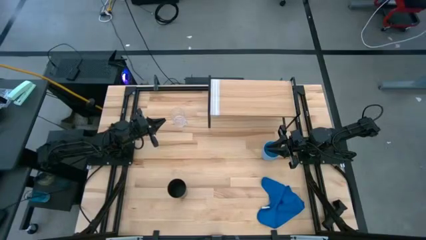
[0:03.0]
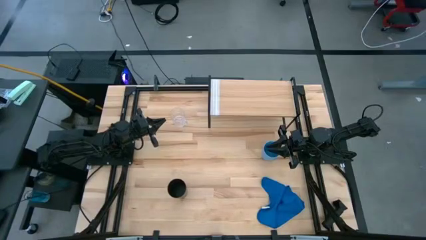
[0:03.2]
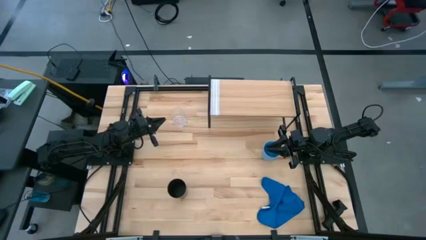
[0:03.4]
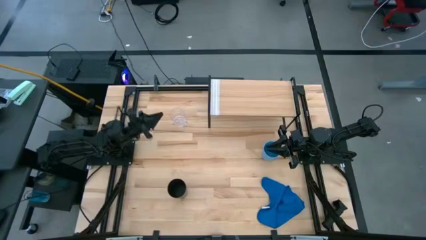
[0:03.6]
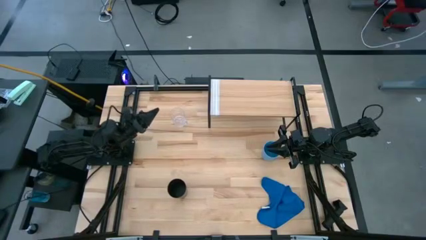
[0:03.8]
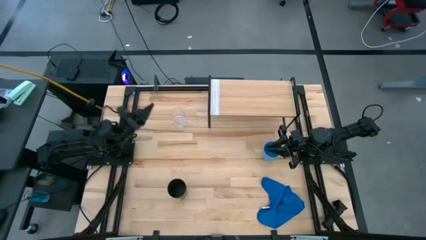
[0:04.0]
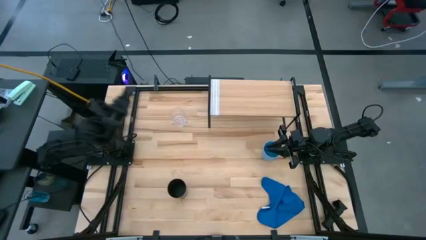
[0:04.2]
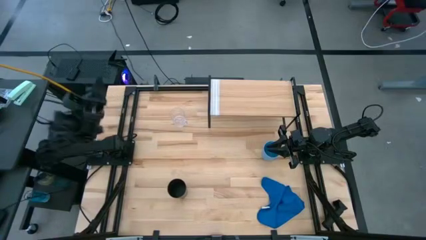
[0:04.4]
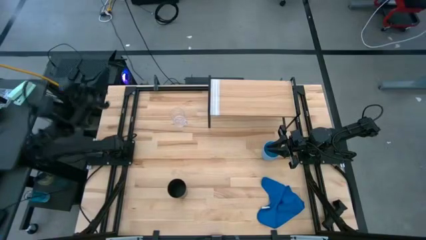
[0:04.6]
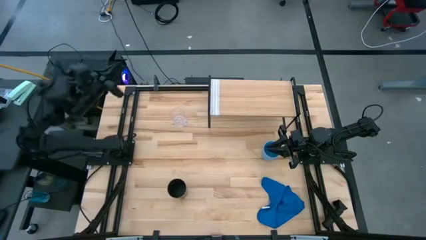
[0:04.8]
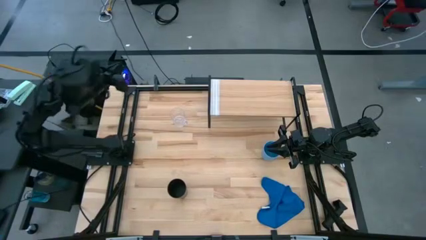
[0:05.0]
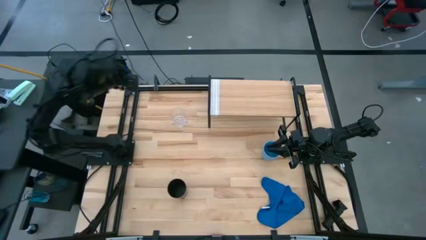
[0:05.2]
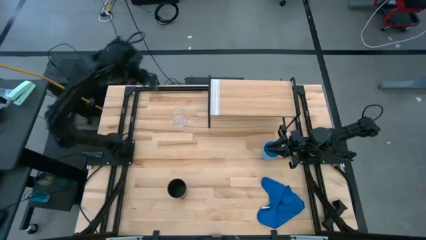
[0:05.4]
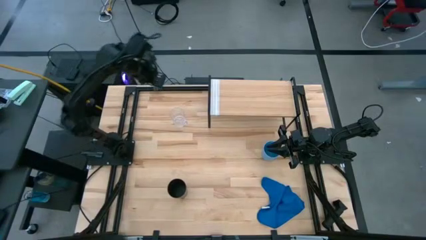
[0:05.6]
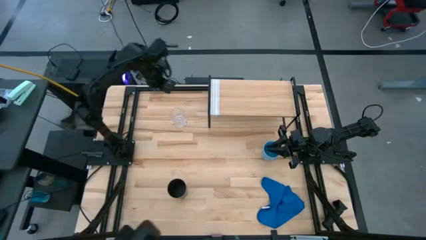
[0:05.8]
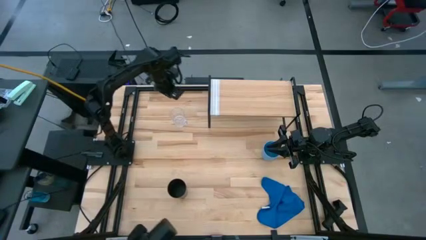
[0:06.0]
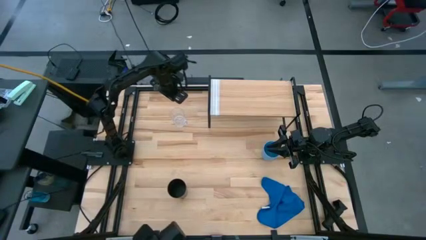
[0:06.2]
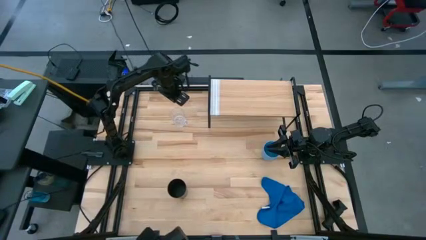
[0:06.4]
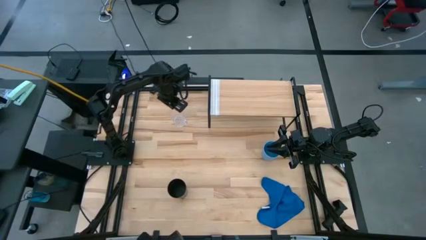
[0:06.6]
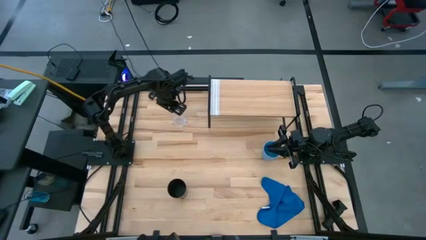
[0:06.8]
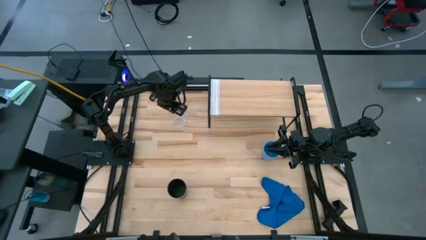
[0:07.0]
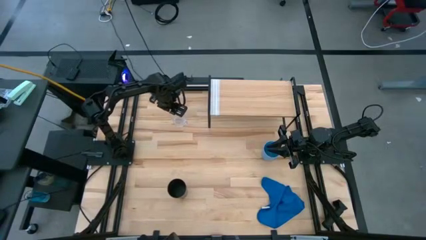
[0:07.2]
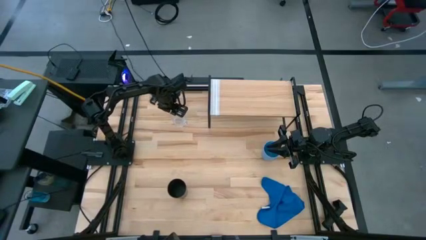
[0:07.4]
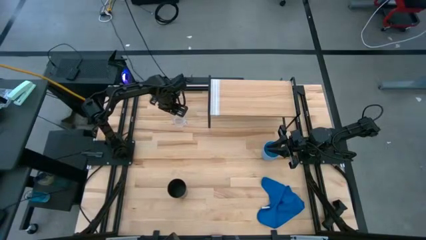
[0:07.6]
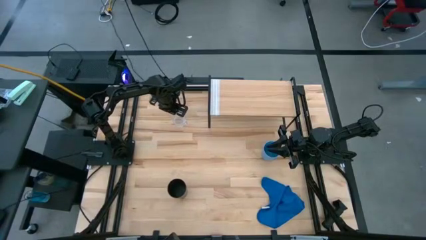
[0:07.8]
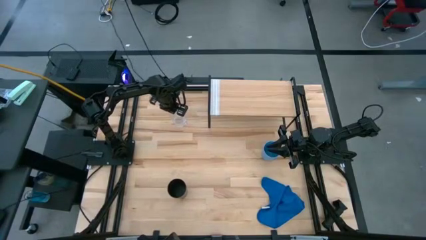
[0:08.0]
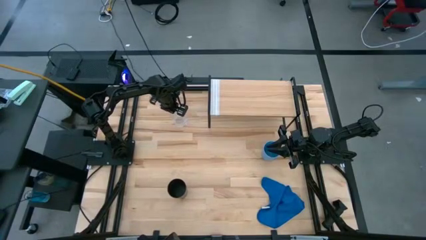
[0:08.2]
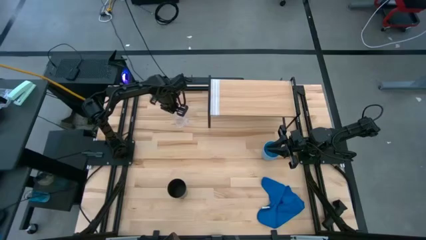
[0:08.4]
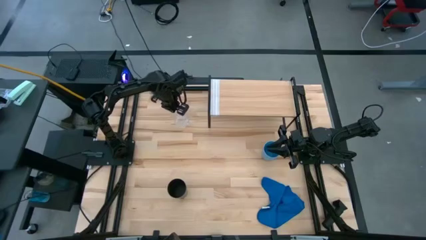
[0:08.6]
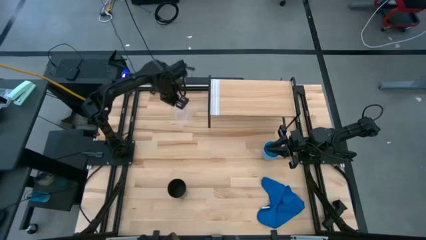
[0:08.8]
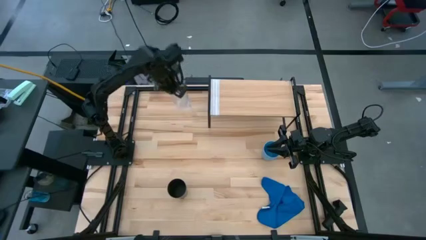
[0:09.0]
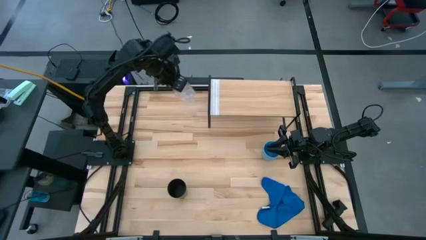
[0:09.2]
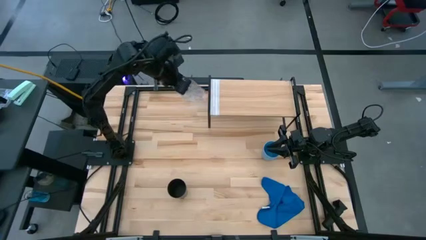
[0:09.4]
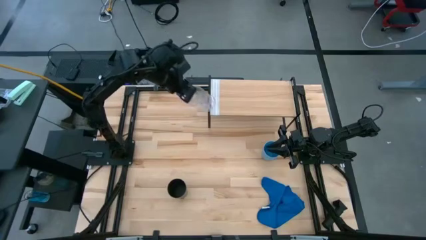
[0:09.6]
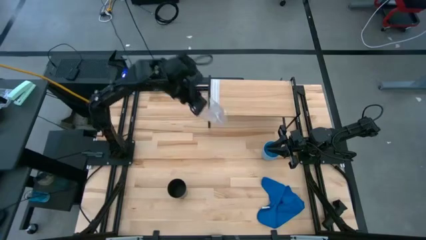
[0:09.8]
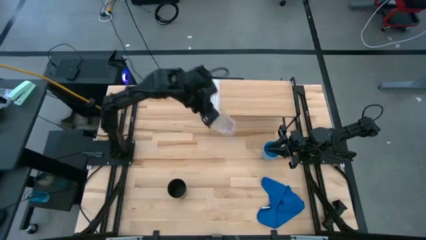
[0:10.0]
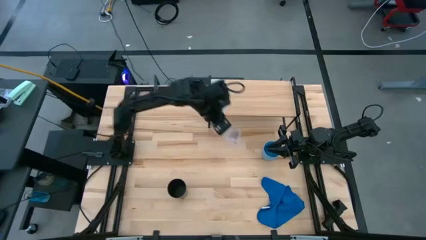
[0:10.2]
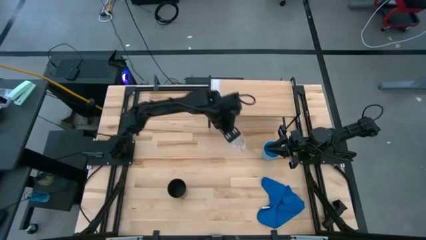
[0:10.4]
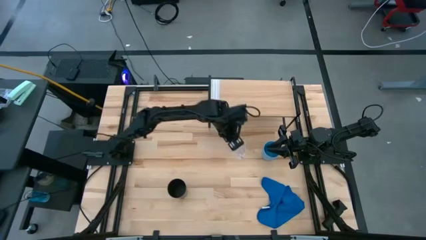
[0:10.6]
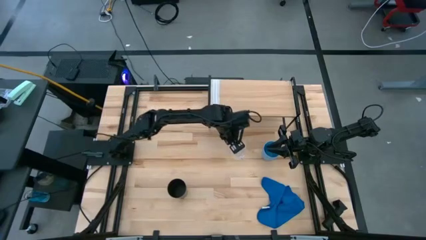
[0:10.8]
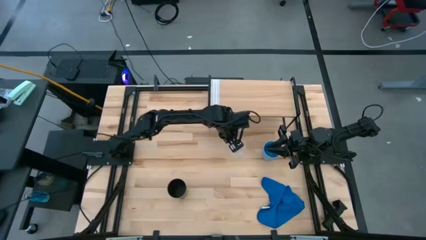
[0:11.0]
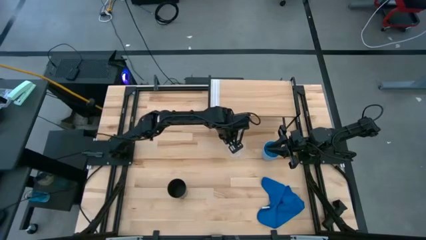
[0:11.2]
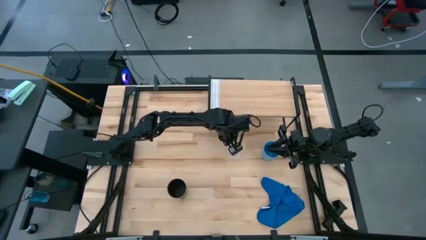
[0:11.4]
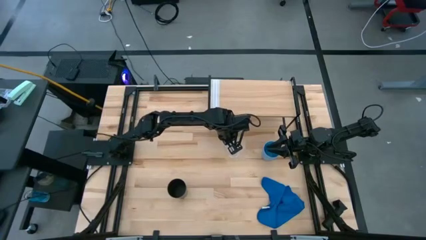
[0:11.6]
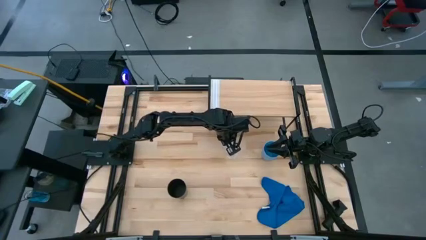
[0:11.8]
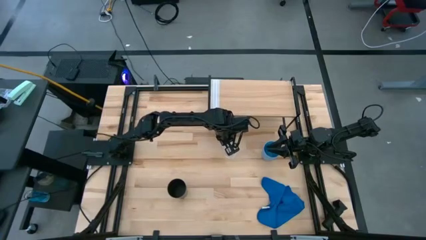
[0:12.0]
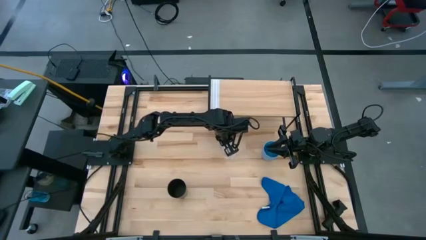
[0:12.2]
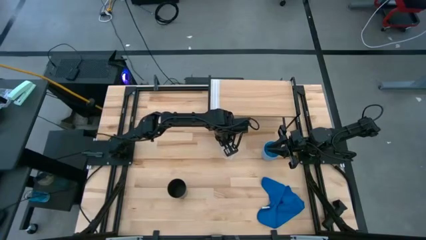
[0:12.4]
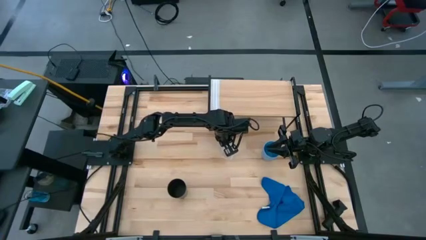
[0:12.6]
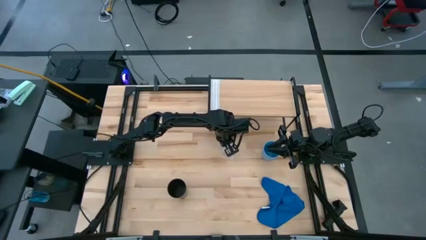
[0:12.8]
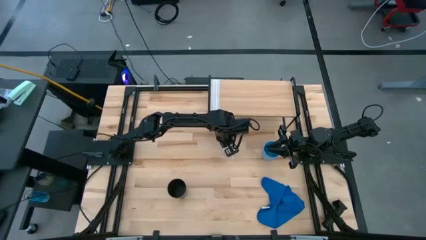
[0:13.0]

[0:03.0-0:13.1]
Task: Stack small to large cups/mugs on shelf
Move the transparent cup to the center of the table

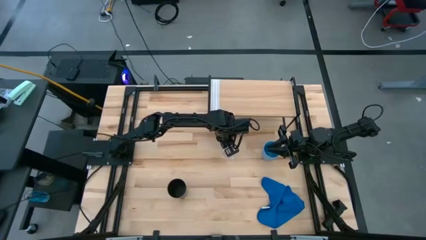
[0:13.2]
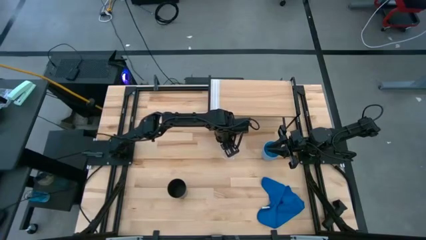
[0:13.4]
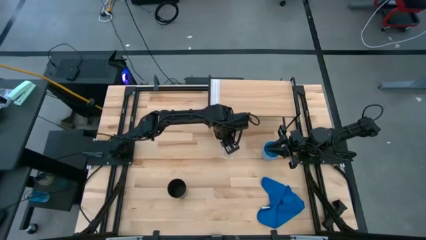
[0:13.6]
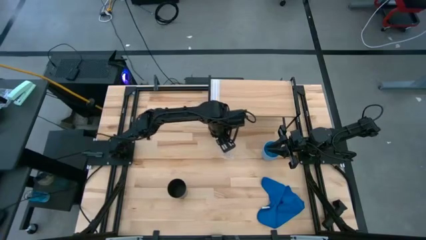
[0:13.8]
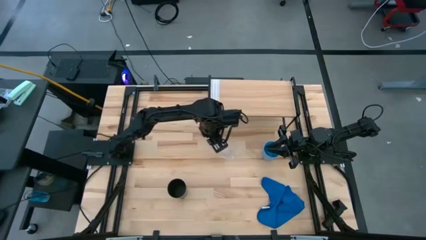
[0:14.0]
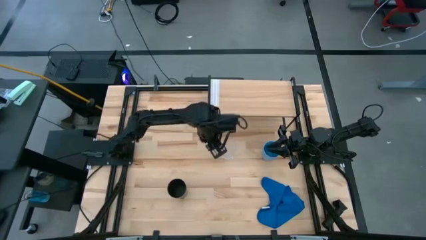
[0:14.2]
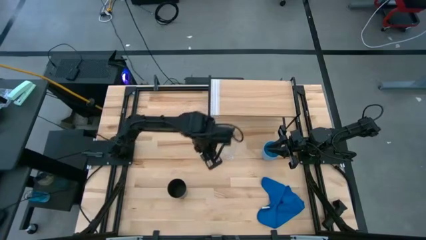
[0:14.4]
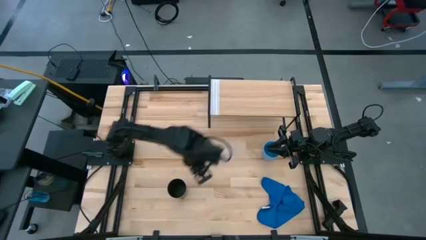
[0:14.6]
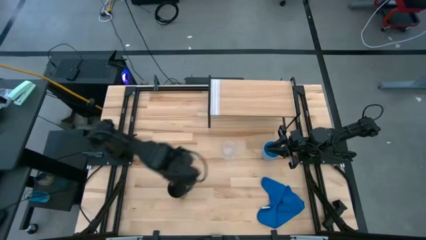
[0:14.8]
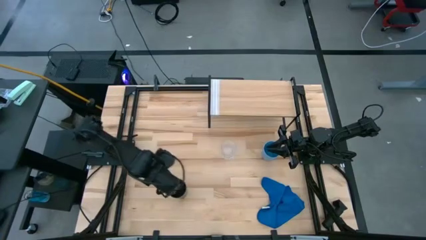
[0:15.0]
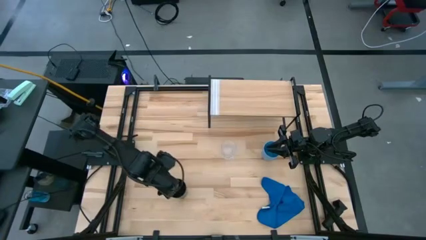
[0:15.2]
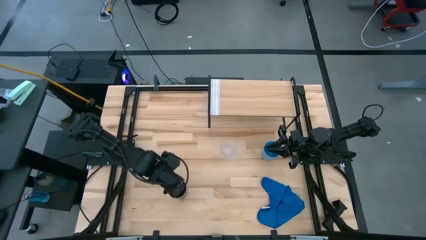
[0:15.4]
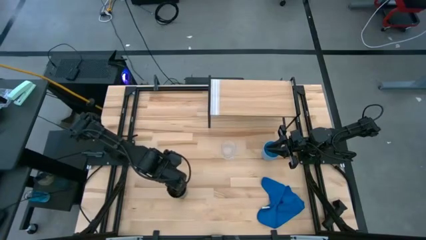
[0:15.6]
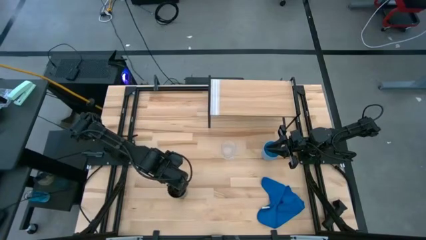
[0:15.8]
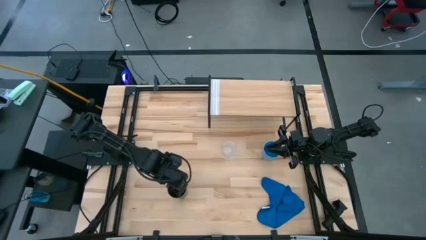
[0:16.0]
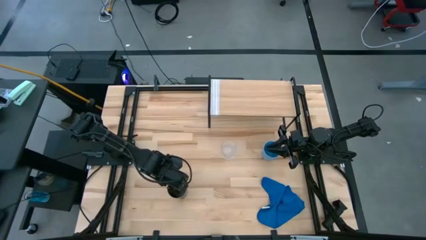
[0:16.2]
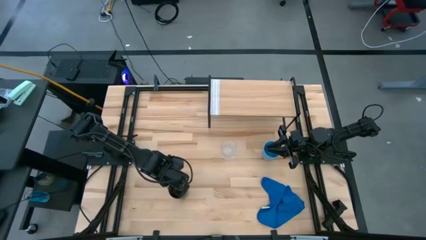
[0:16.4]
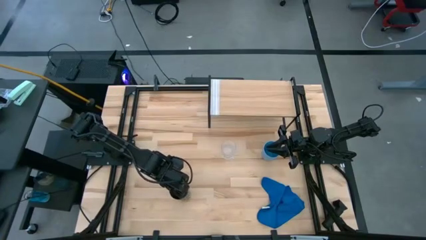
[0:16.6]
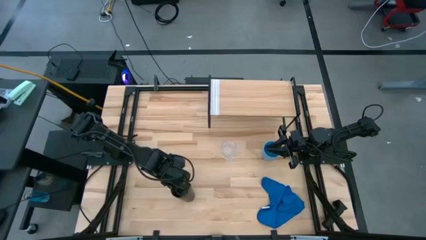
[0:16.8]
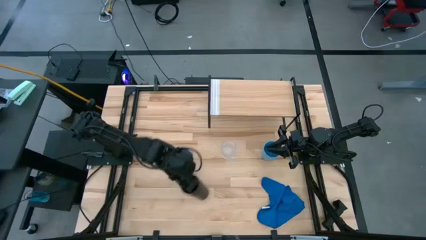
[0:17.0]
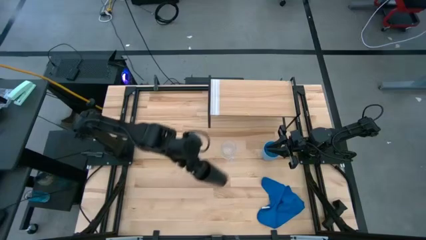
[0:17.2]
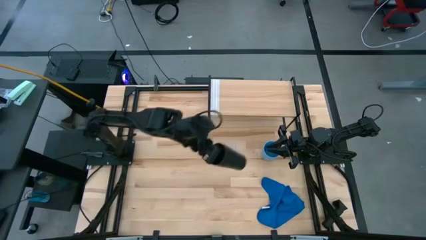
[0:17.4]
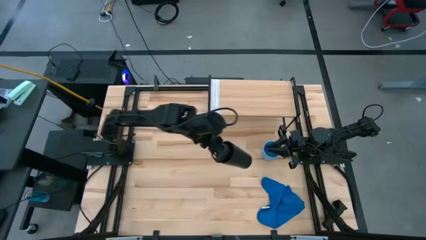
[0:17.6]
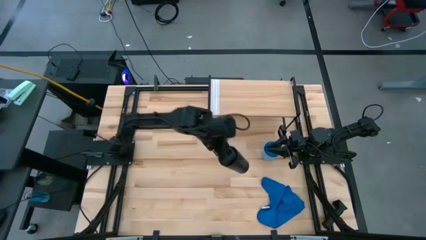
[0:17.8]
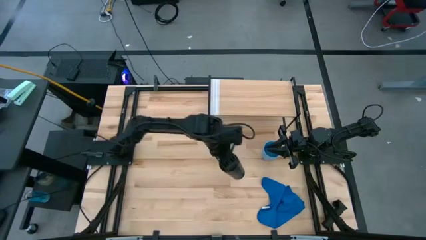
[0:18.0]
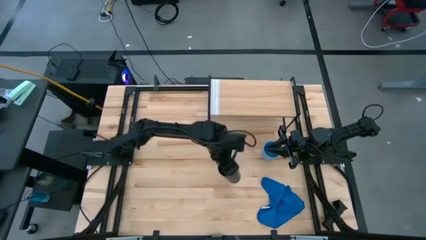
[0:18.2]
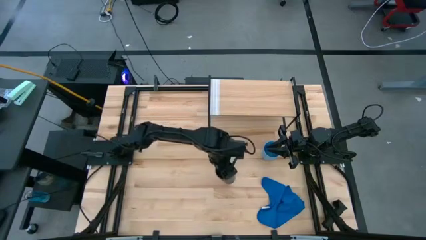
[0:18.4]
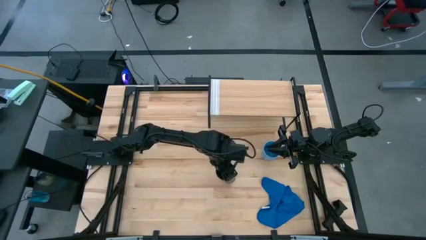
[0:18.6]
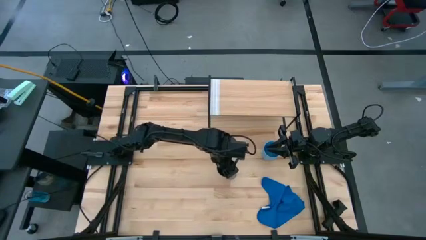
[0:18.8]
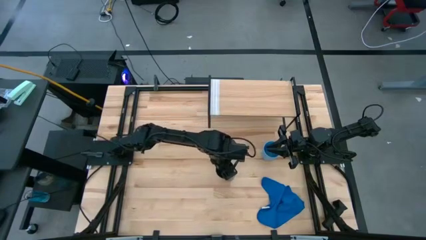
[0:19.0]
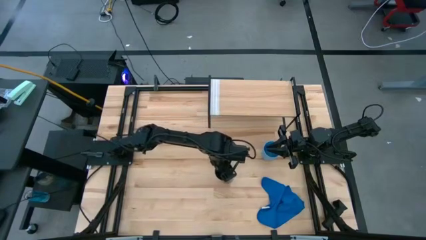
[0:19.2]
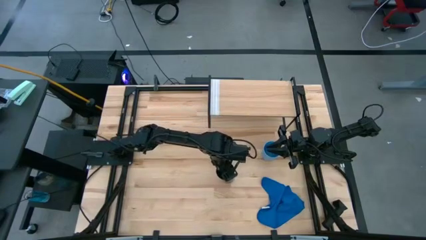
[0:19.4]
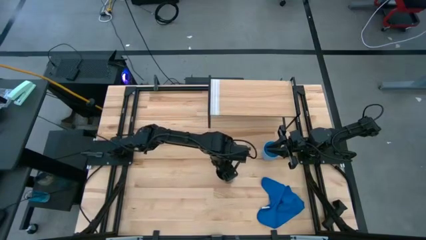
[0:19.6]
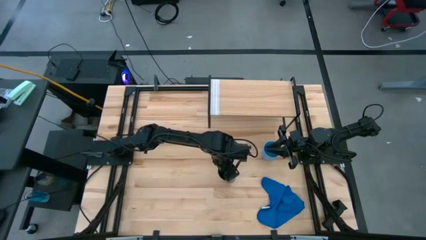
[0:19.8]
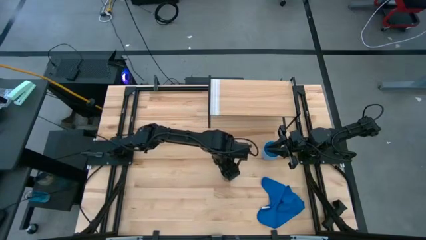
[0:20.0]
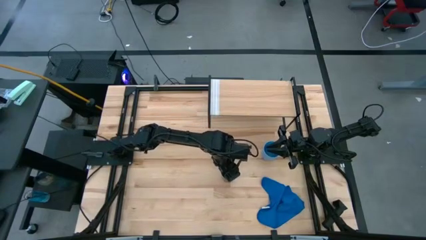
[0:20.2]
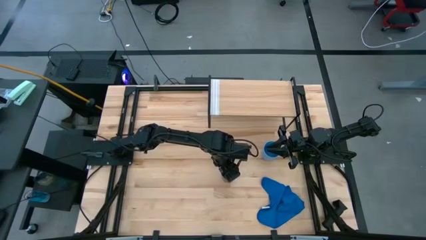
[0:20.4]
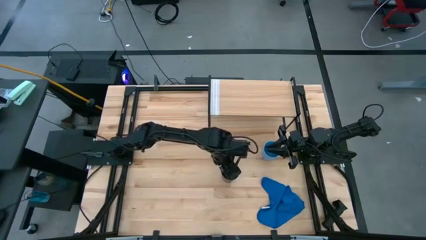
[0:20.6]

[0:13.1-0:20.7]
Move the black cup to the center of the table
